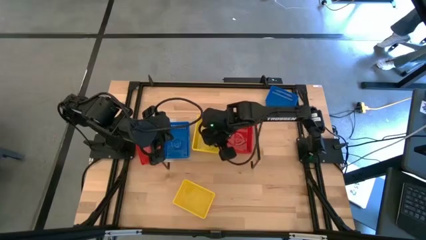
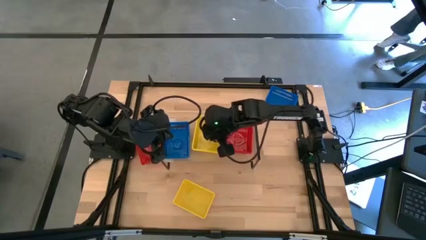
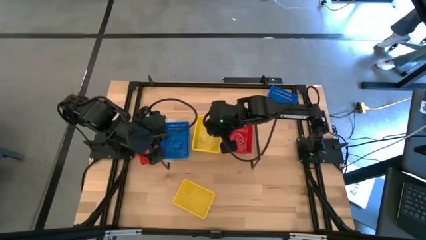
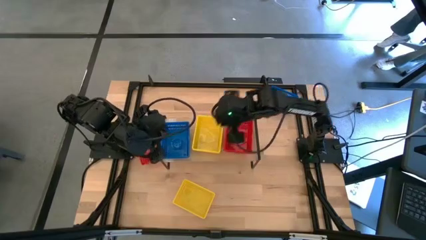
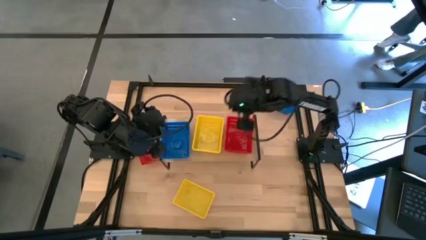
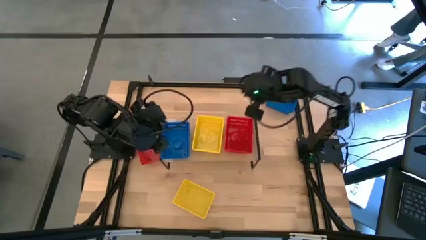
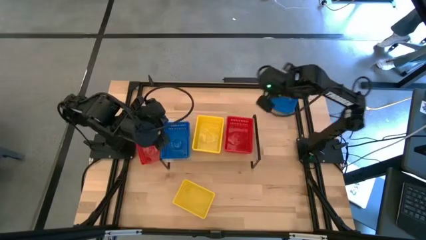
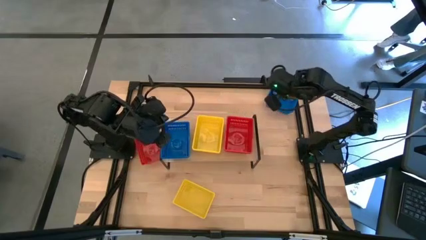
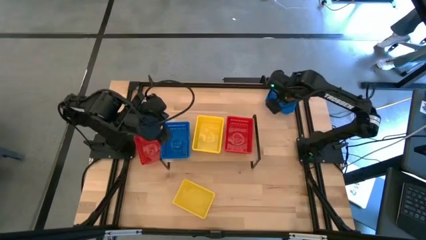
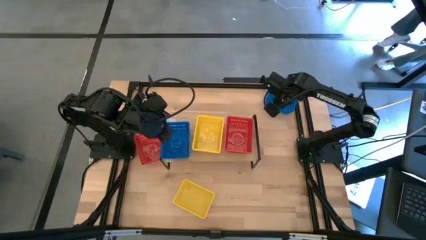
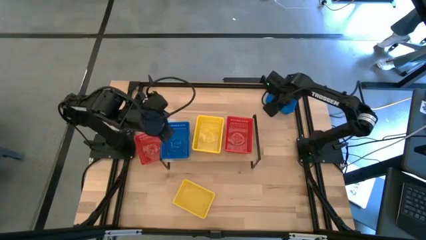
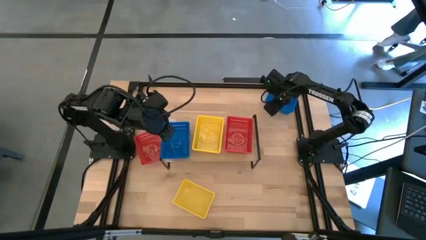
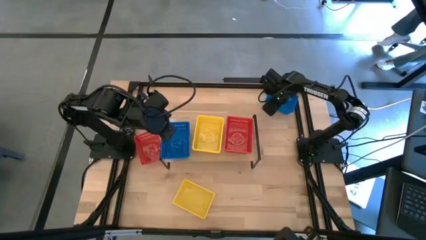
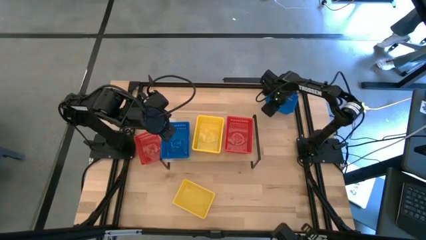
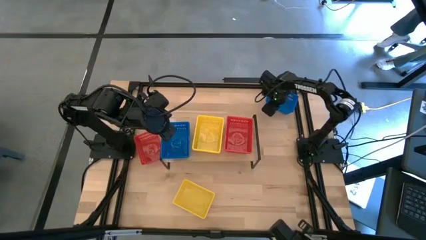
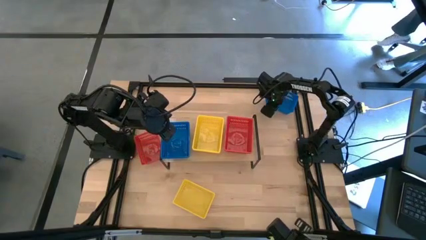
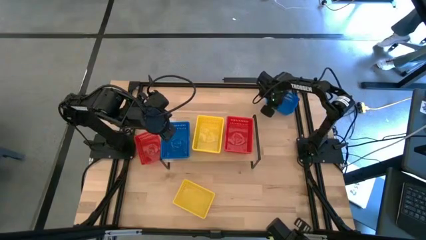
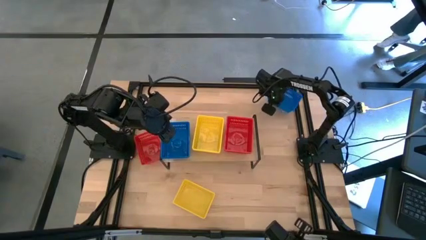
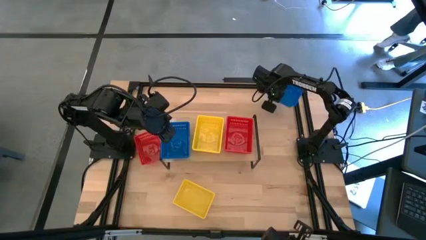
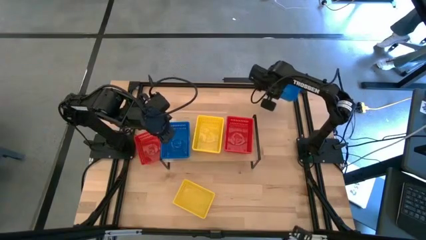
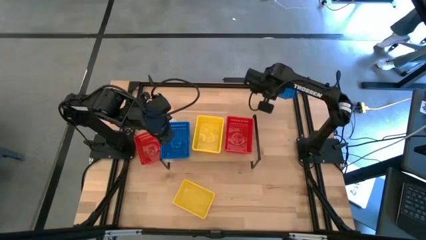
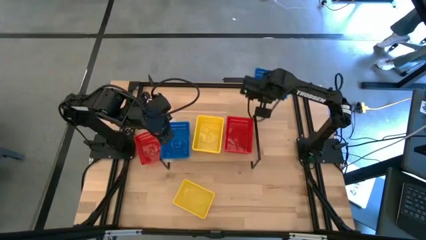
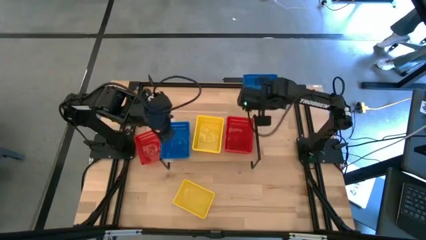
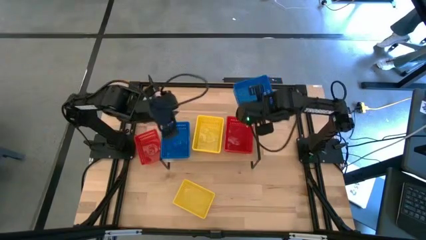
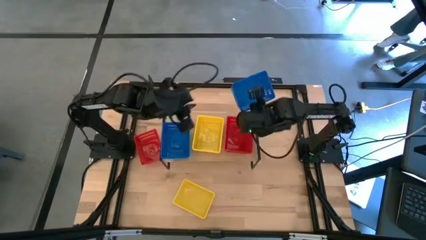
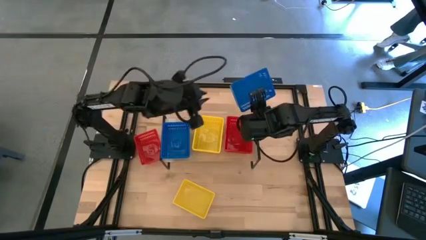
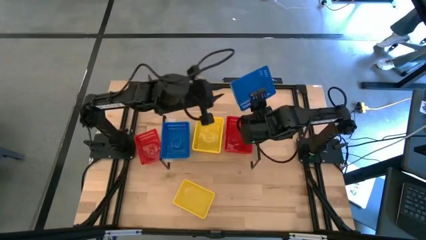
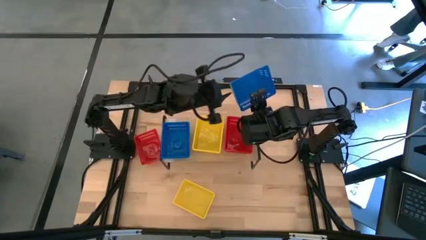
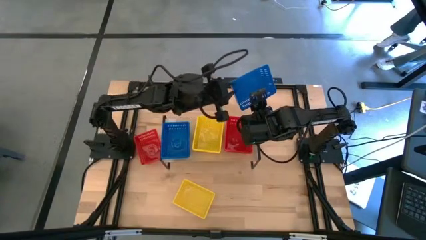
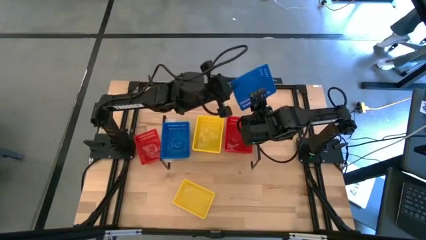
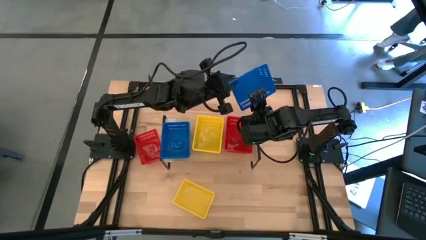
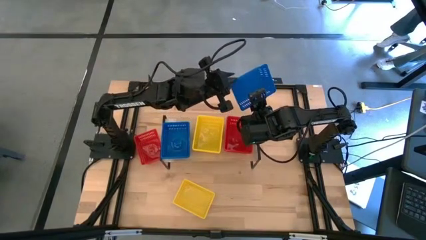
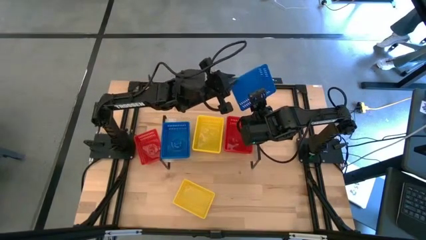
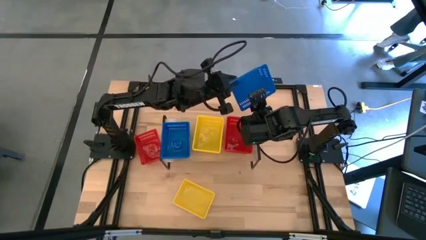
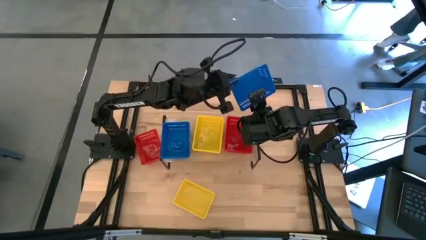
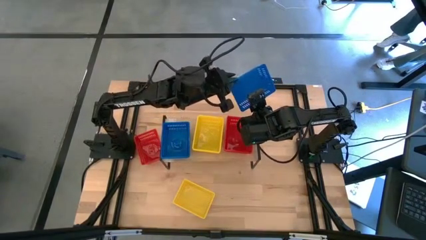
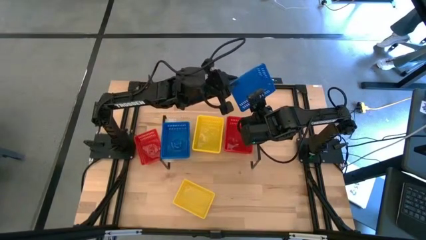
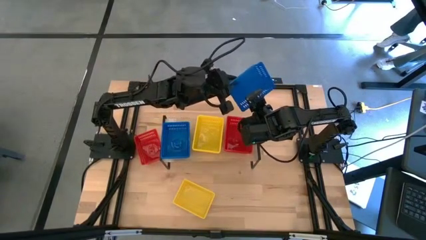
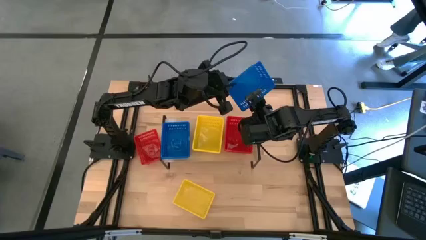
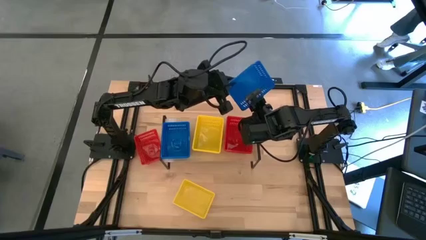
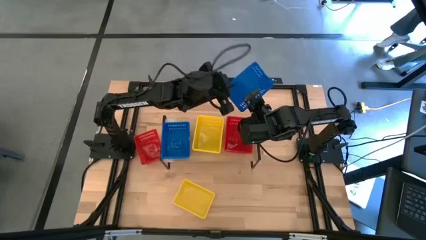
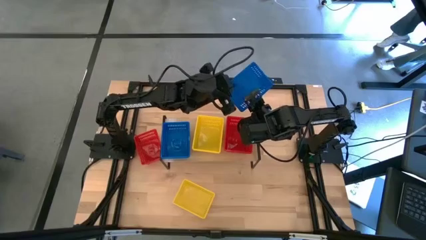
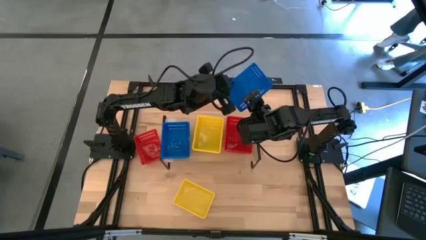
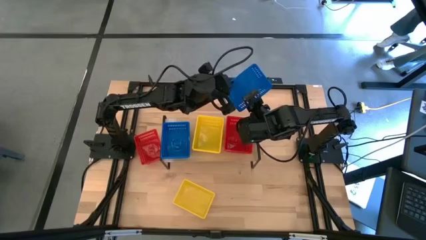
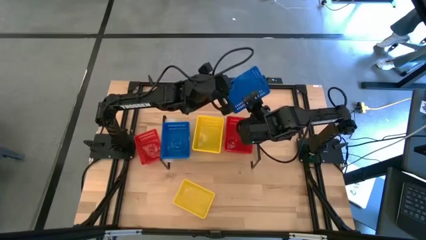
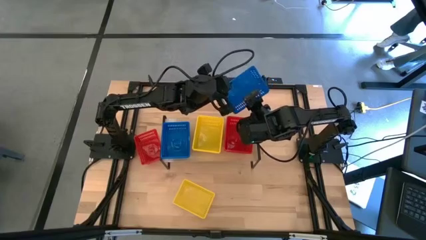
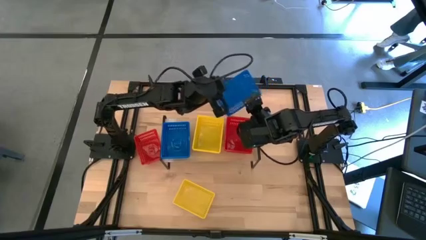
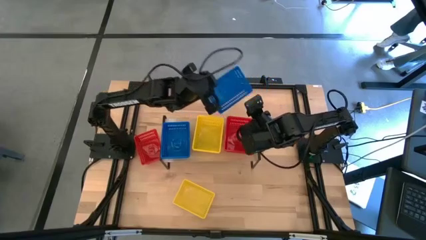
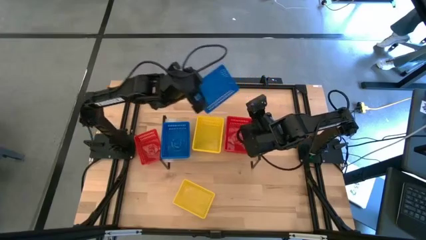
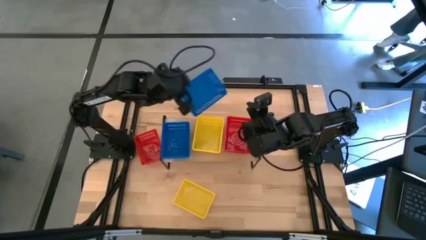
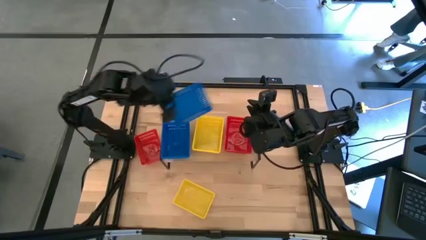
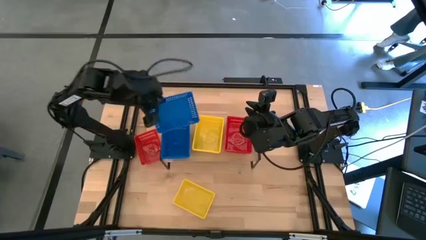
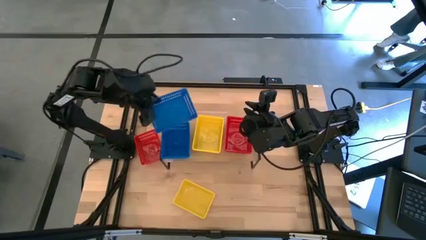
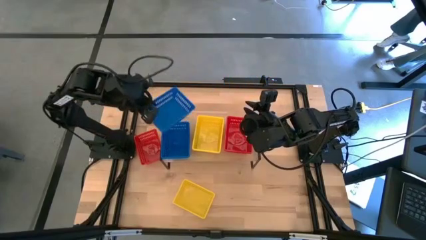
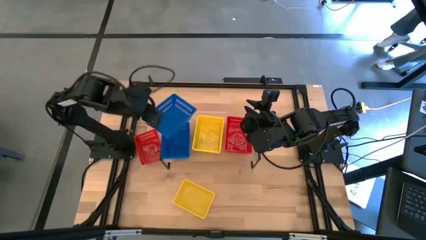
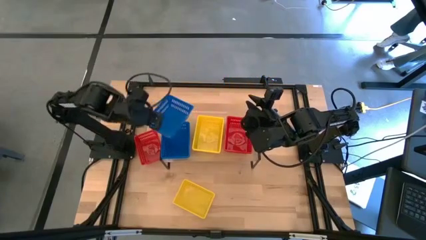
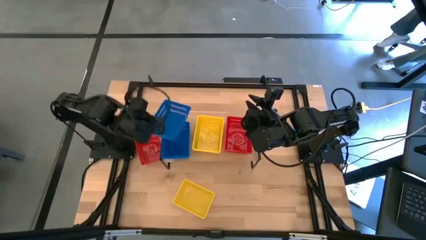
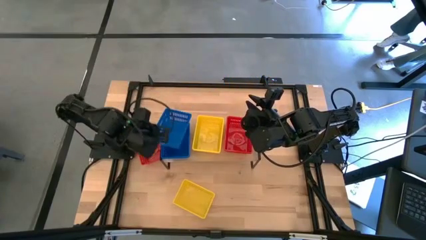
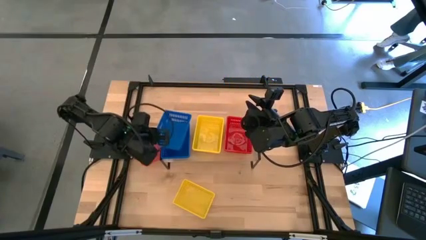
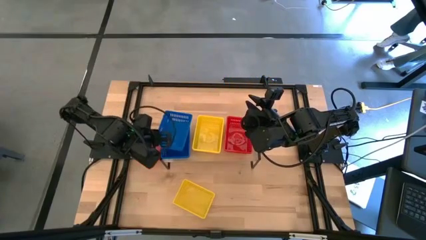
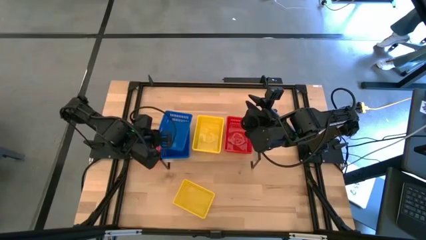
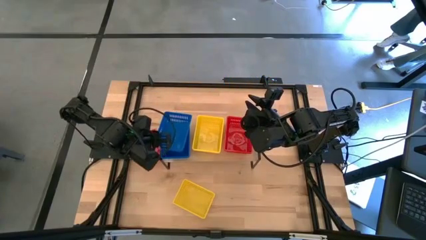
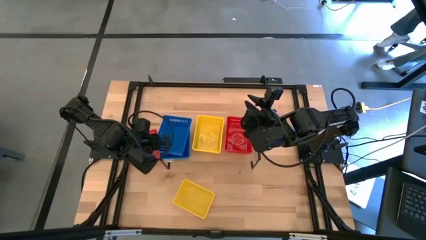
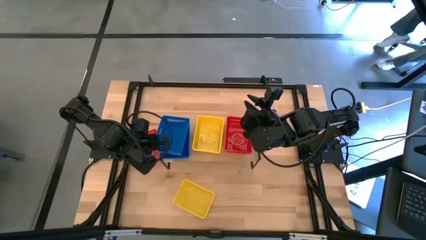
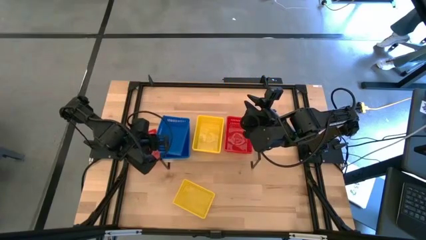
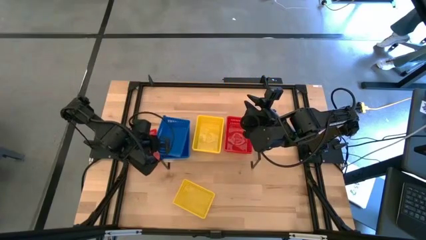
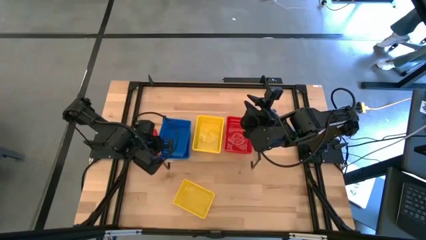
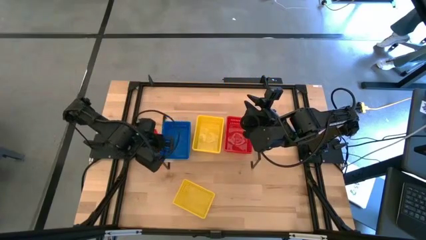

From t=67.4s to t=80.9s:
Task: Stack baskets on shelf by color
Stack the blue bin on top of the stacked blue bins on the shelf
